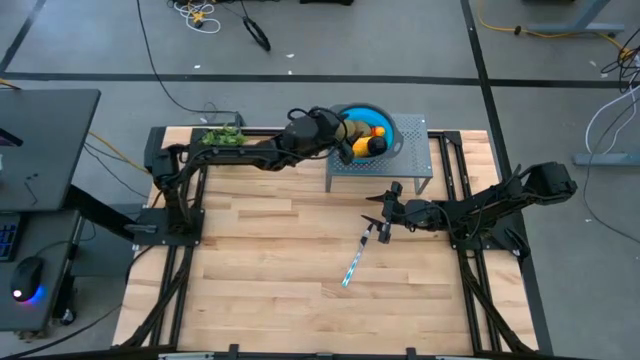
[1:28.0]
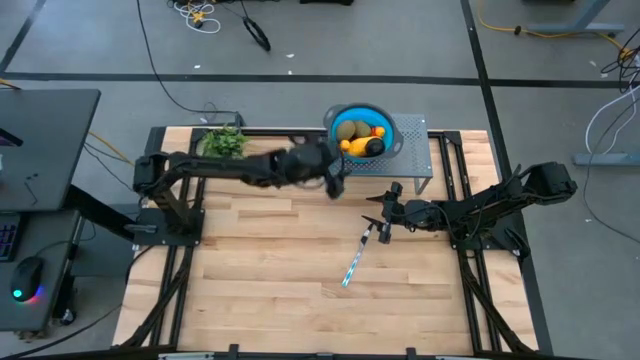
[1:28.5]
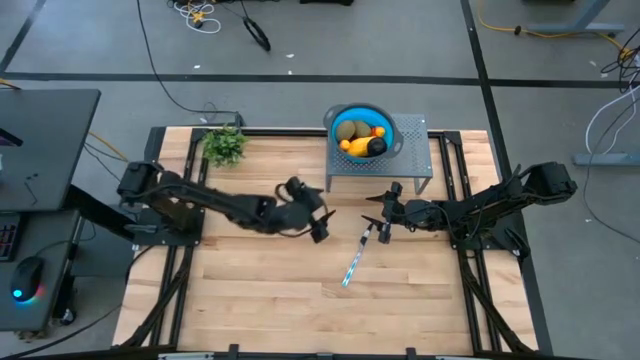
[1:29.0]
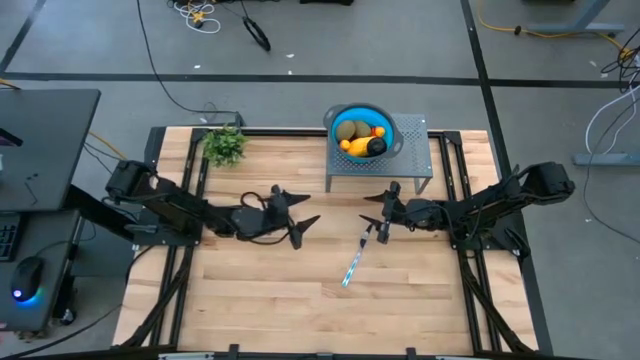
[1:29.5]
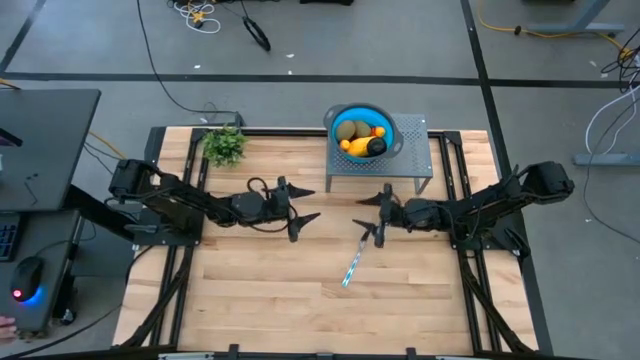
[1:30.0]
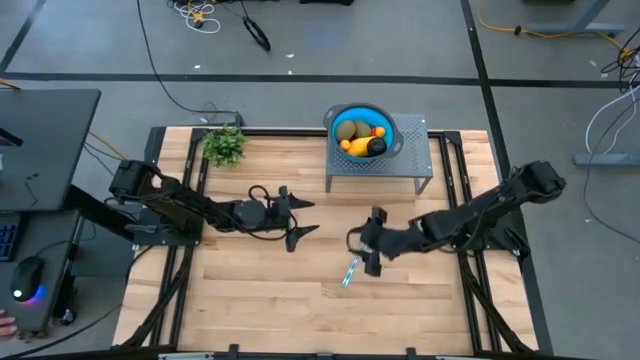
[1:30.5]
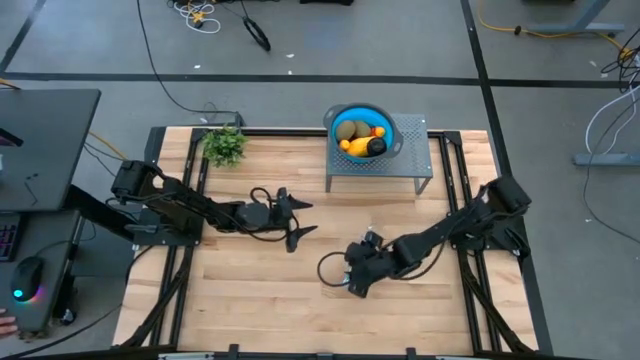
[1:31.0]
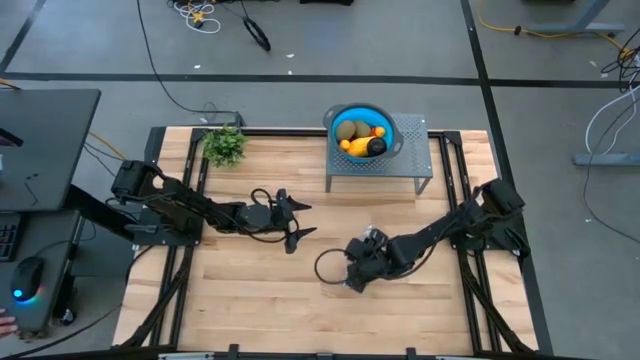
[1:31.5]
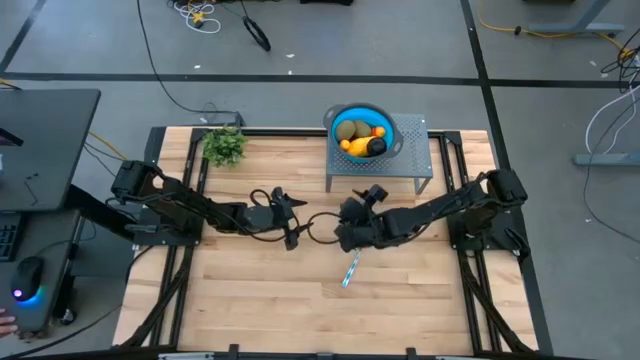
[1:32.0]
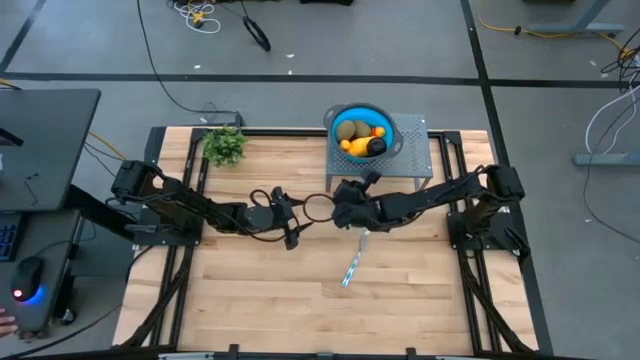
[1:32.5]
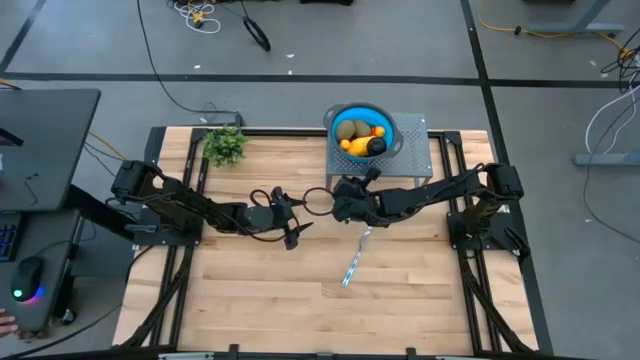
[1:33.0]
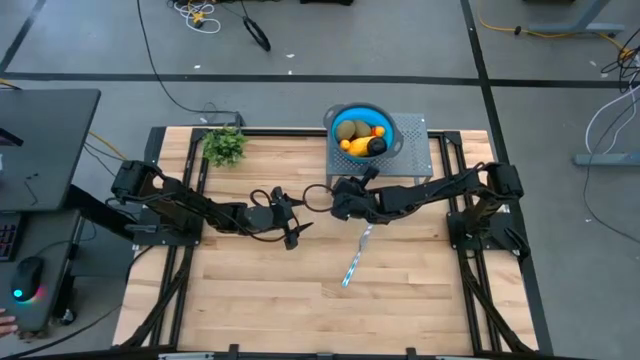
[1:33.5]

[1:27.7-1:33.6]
Task: Pick & Place Fruit
Adjust the shelf

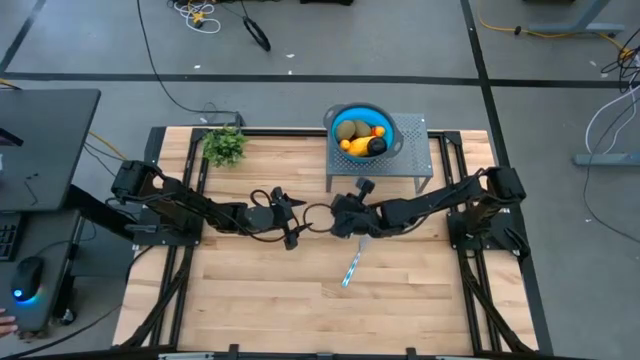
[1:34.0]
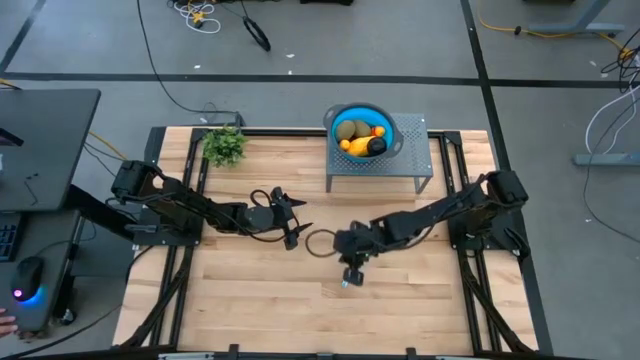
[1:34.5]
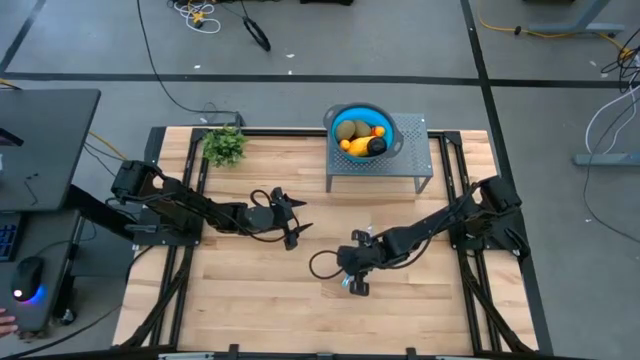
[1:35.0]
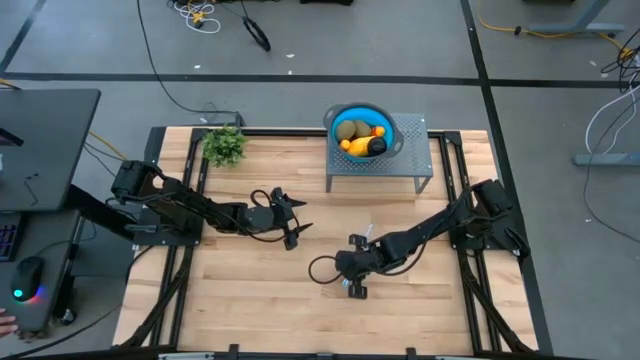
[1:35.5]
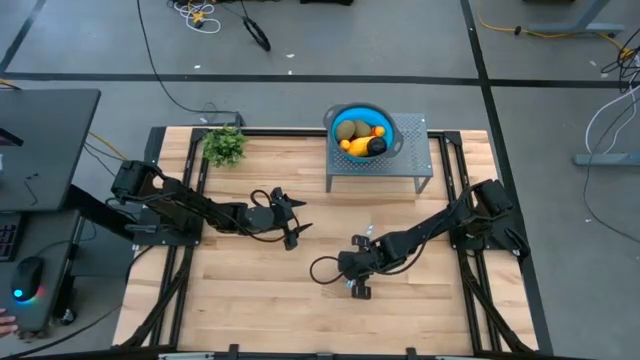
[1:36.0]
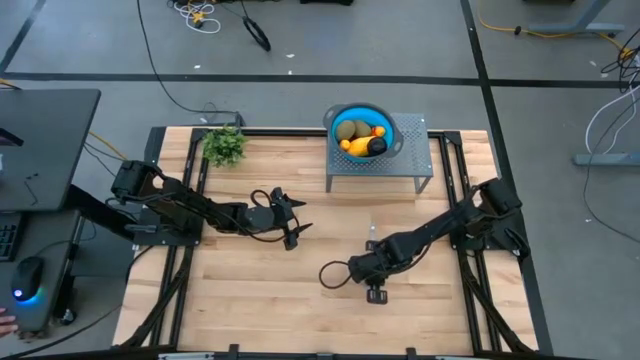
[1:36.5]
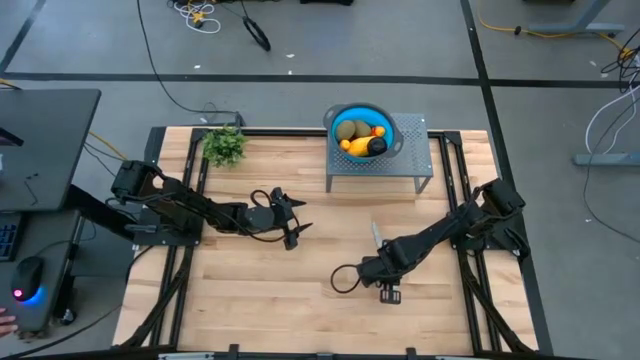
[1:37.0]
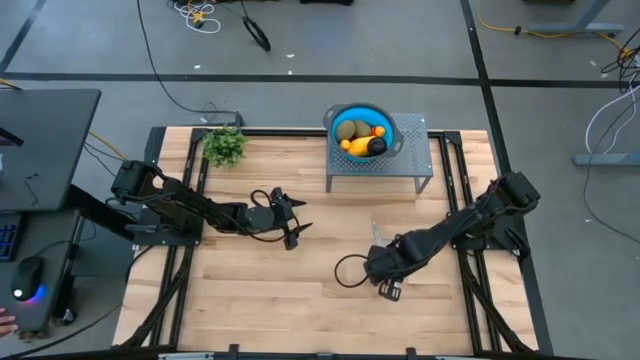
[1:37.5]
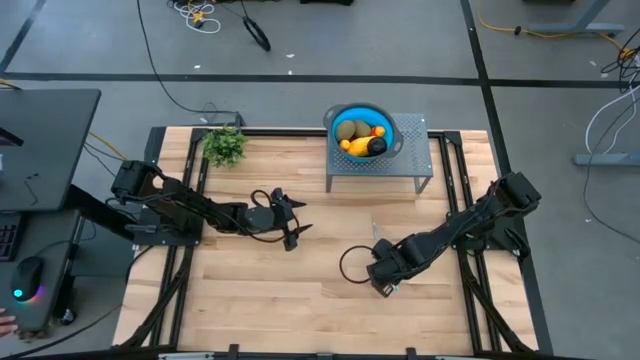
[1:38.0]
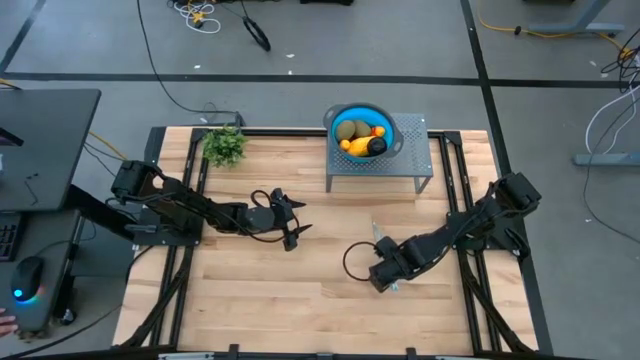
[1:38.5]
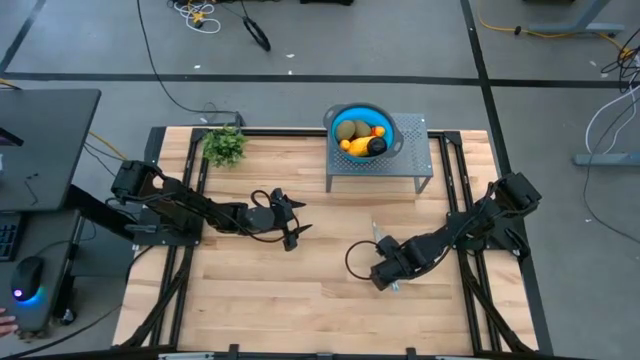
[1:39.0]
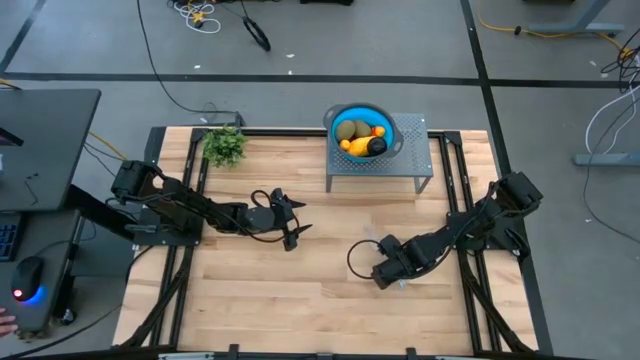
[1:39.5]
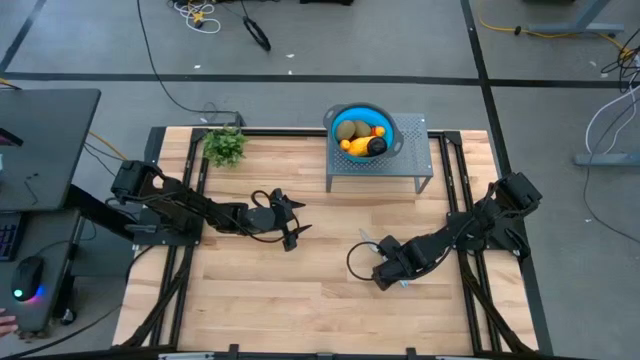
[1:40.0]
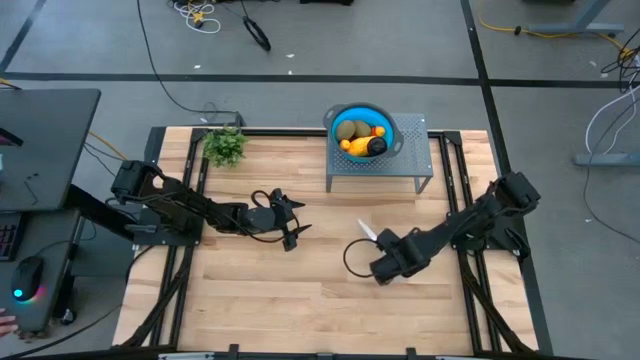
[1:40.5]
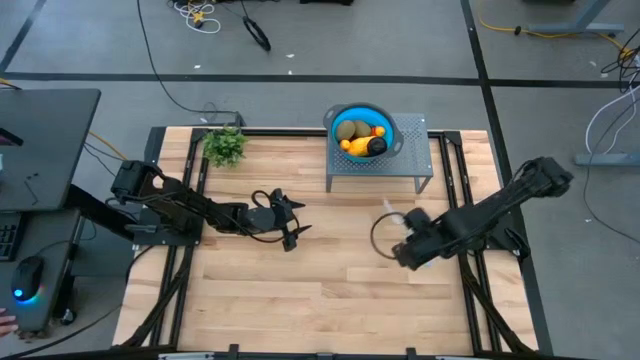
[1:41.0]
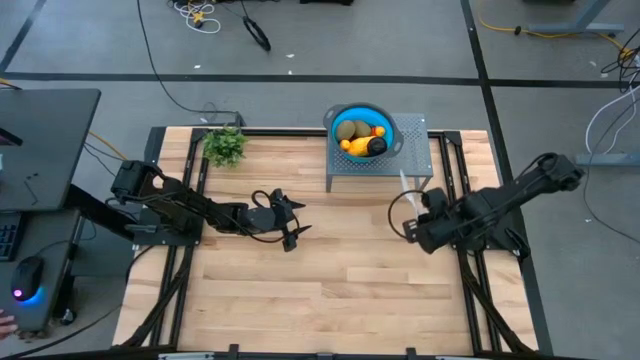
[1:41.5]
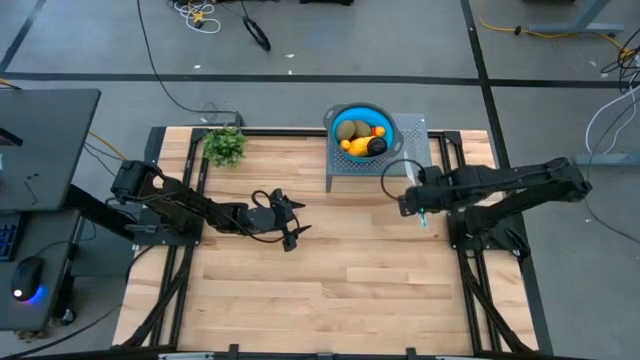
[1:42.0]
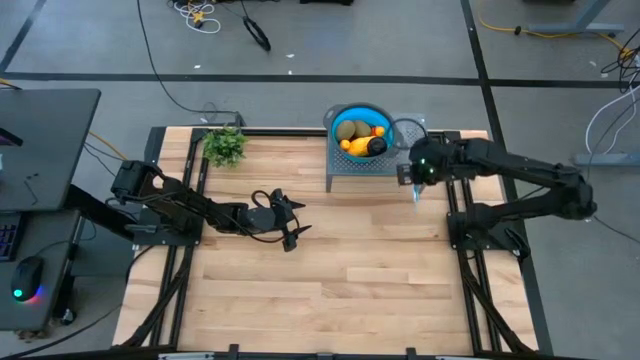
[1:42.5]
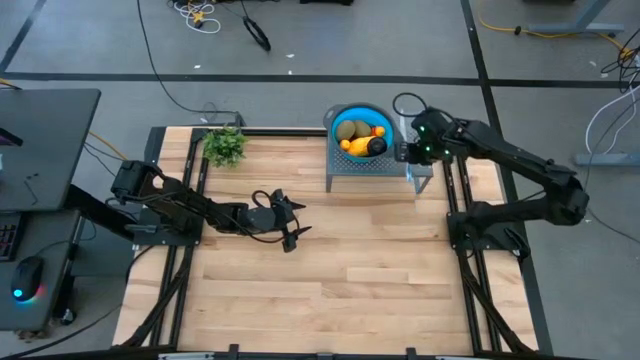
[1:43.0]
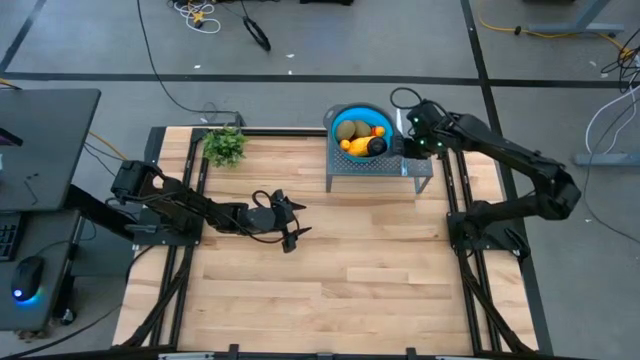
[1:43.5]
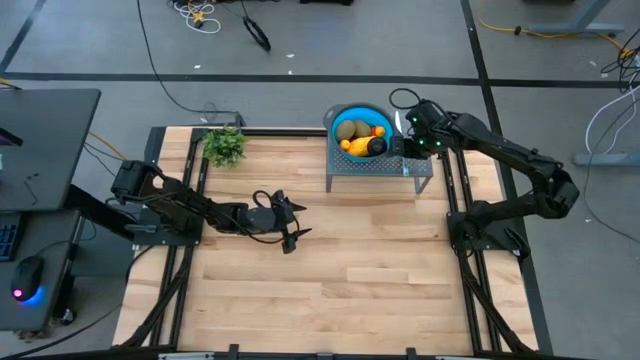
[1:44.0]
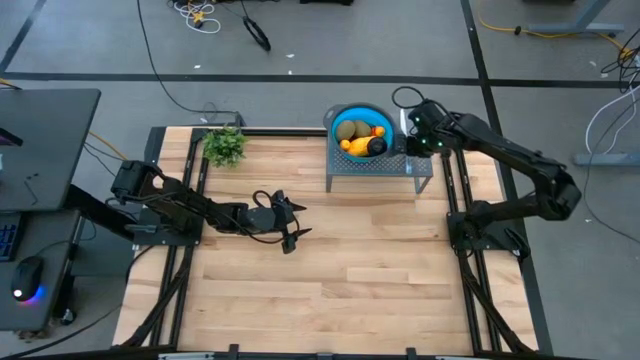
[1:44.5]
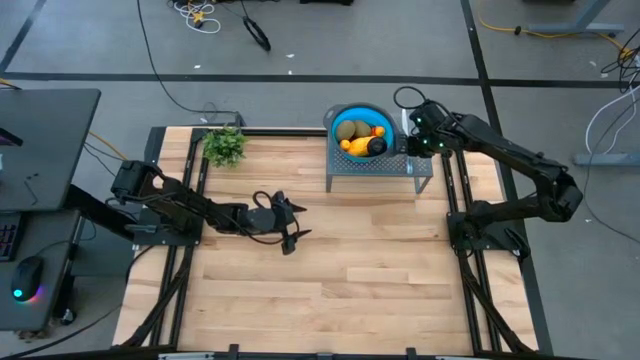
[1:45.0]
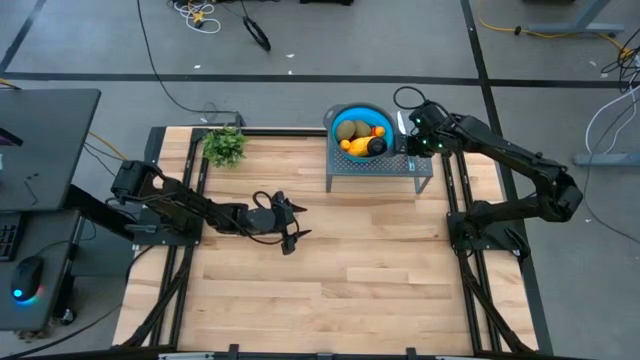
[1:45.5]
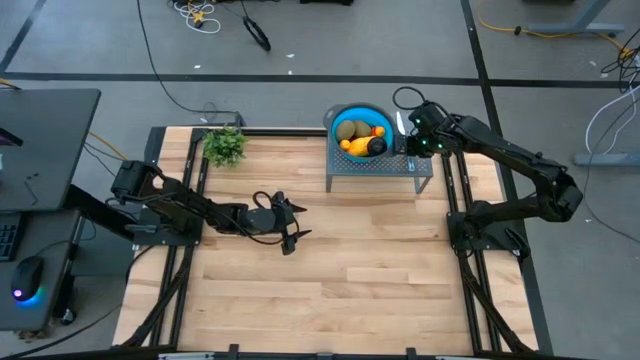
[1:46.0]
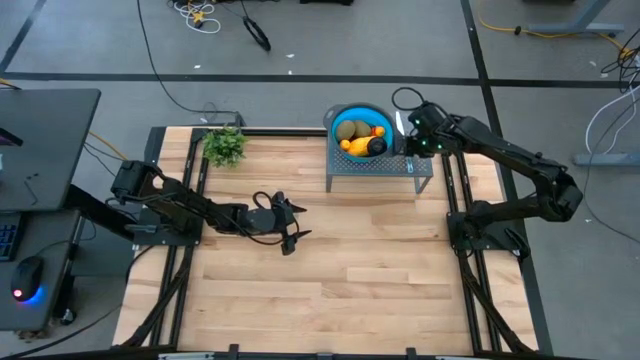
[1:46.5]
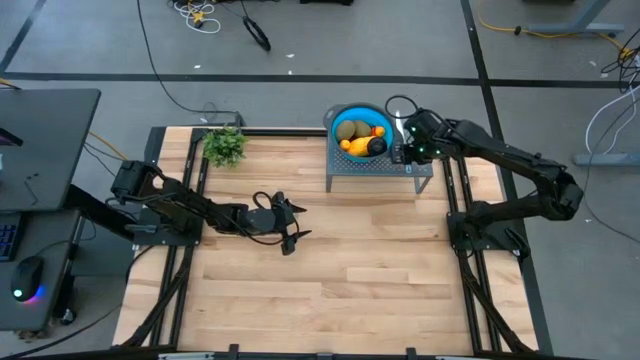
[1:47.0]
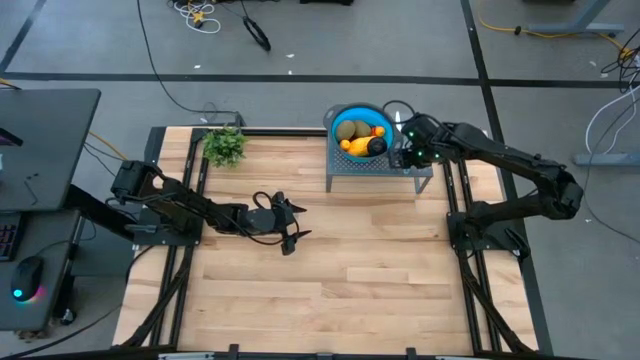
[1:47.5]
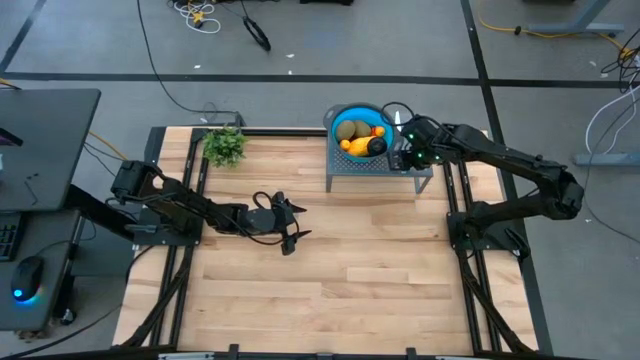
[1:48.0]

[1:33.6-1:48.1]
Put the white and blue knife on the shelf
